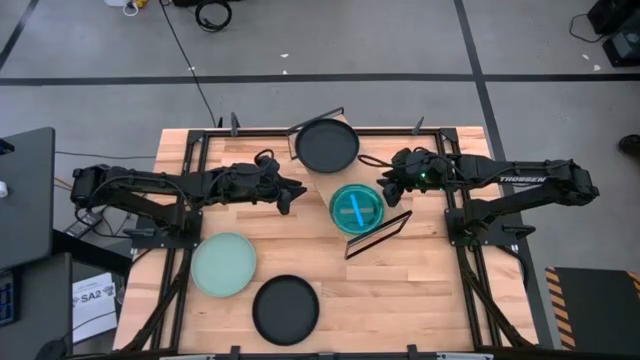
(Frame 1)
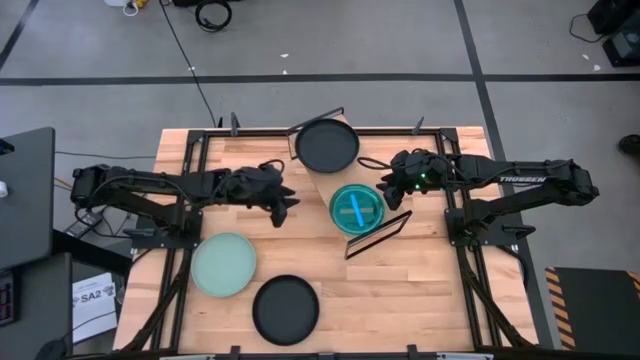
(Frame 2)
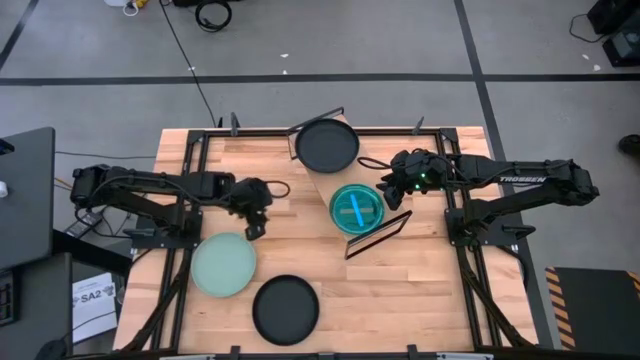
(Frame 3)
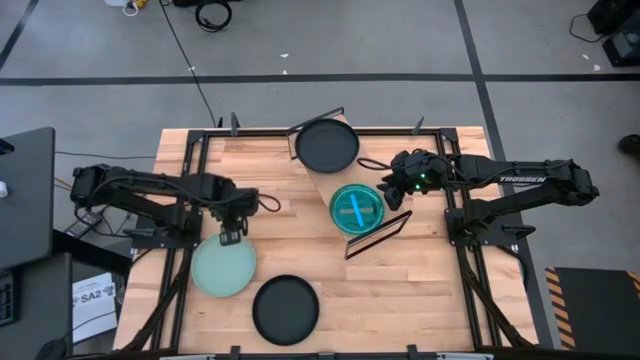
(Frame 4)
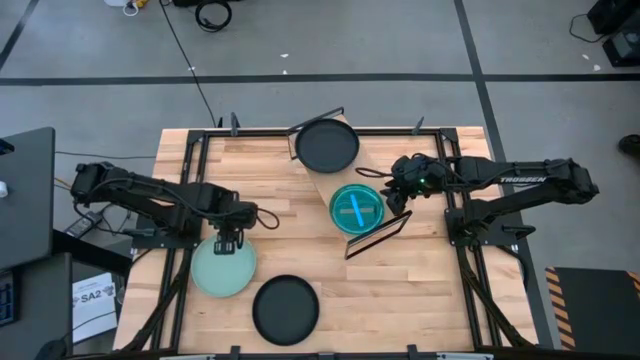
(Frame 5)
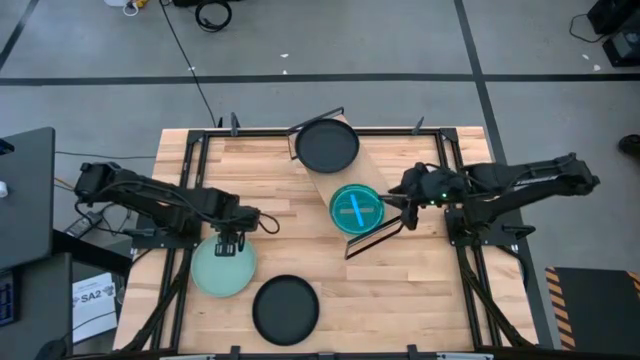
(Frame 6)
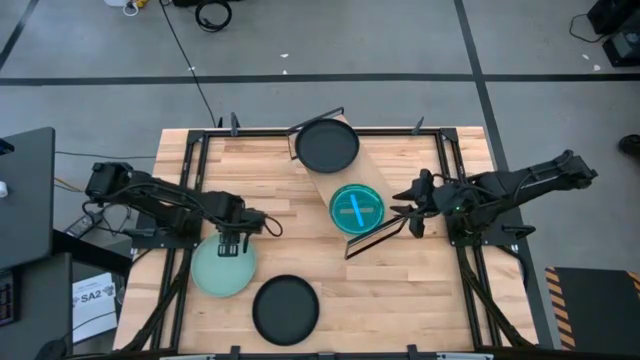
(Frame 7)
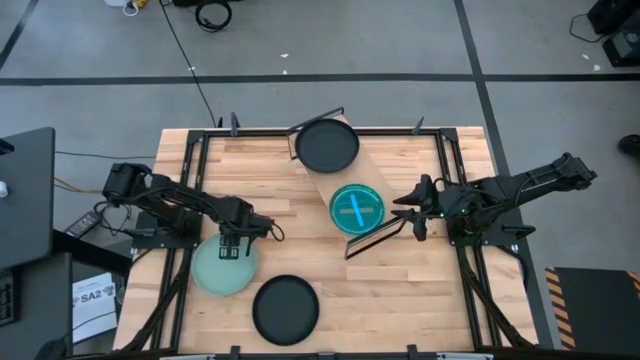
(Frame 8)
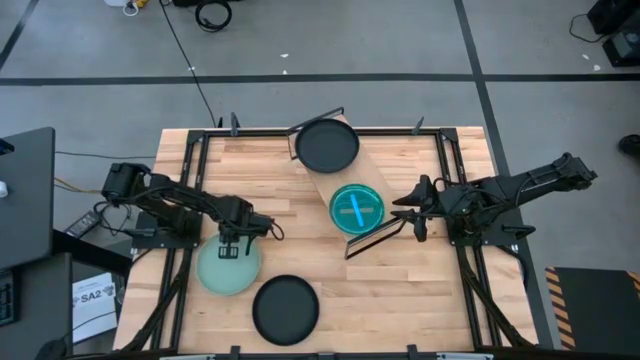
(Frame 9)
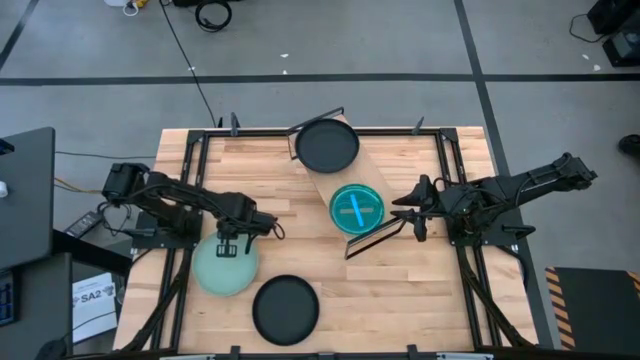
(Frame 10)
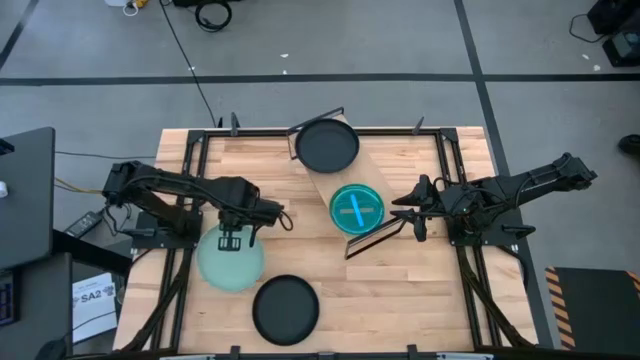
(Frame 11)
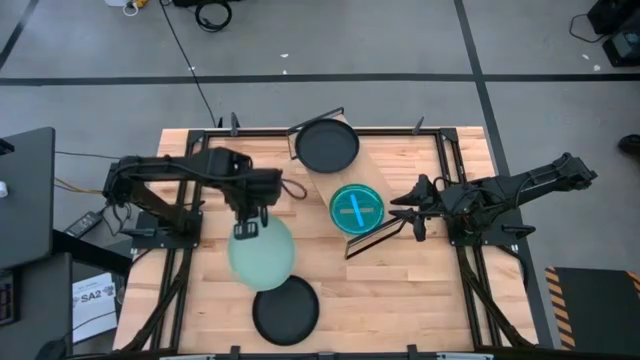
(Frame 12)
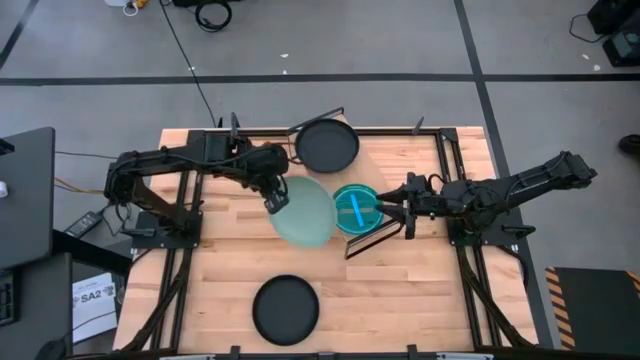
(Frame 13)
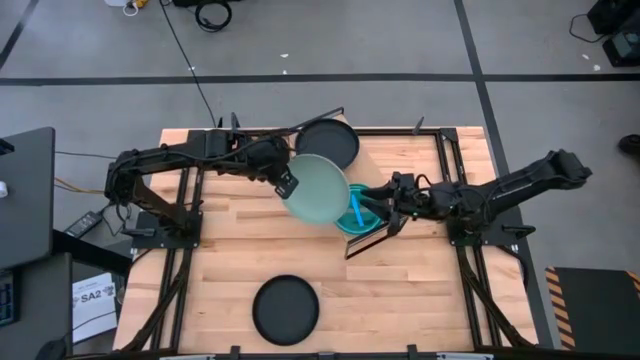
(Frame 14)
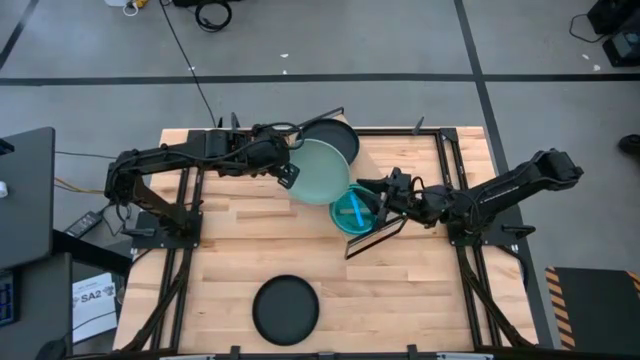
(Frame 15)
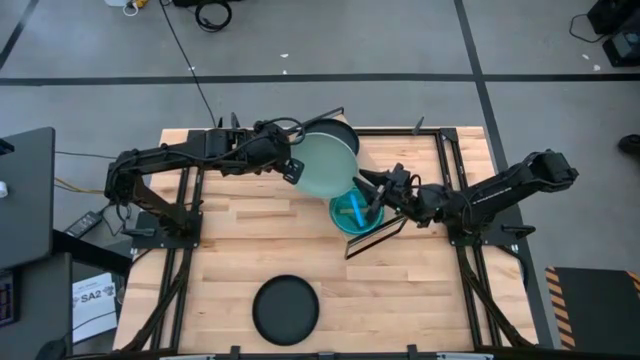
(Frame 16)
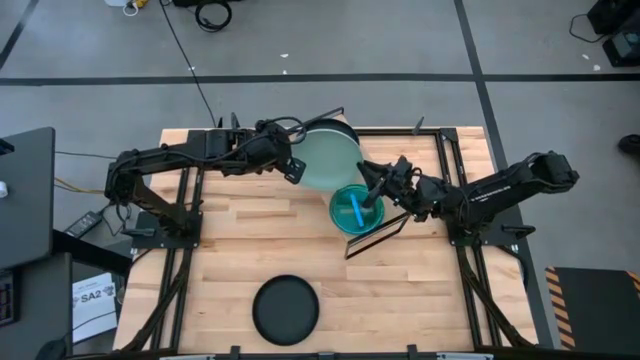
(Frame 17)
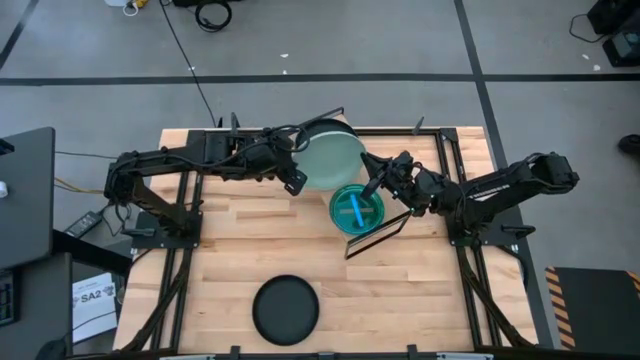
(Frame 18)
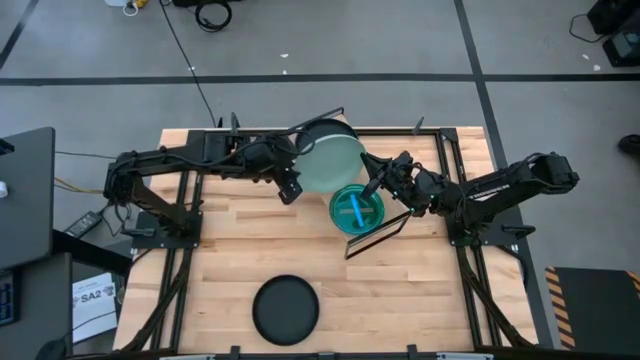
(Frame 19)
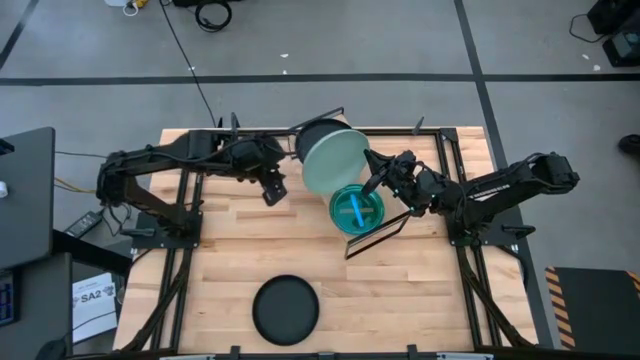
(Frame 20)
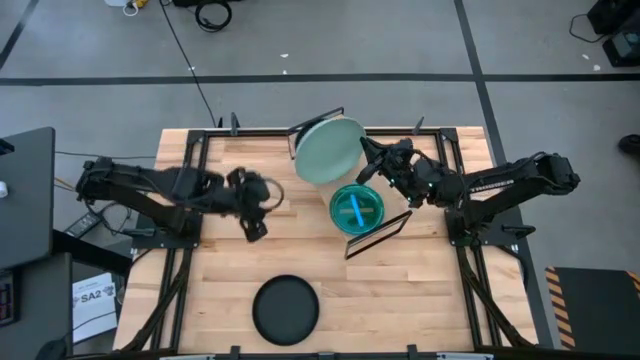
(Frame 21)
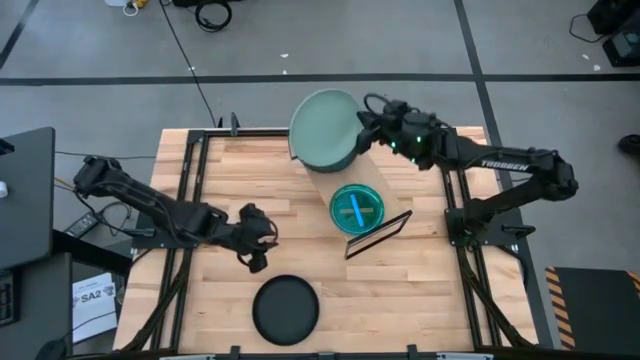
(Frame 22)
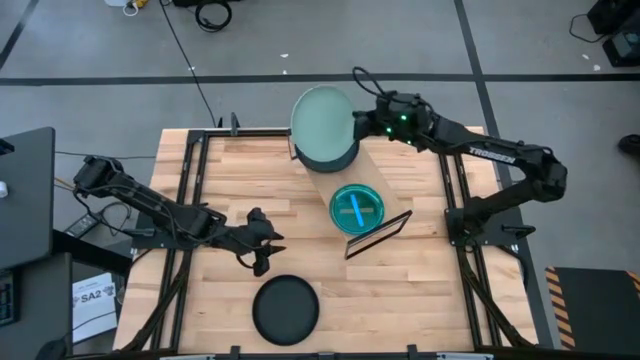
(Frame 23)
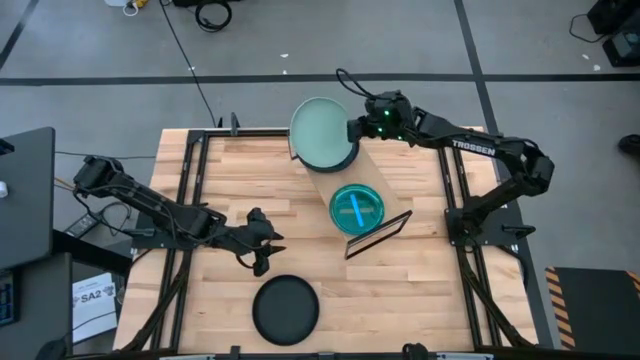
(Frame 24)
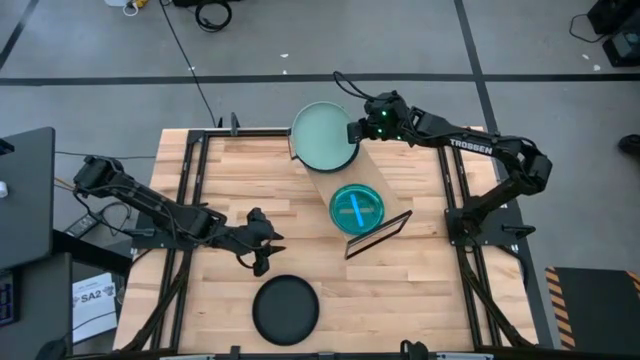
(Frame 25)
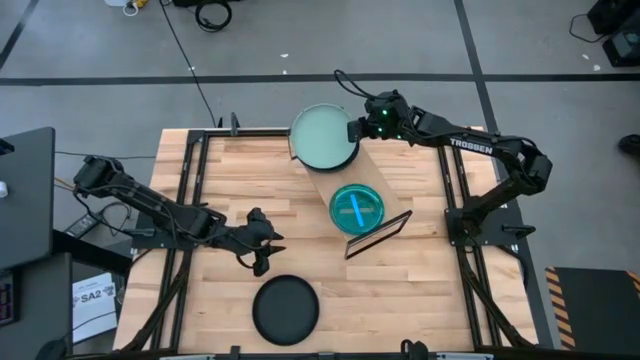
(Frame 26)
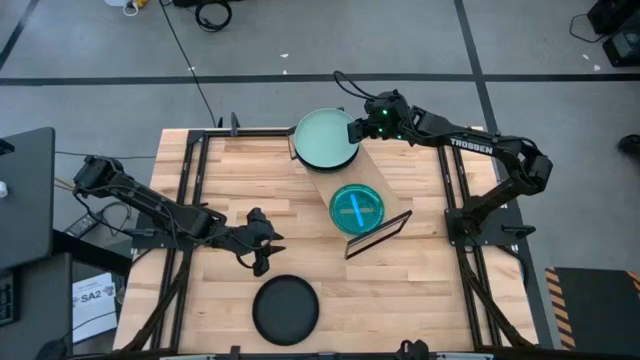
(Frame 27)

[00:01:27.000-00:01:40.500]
Task: Place and stack plates onto a shelf
Stack the light gray plate on the top of the black plate on the shelf

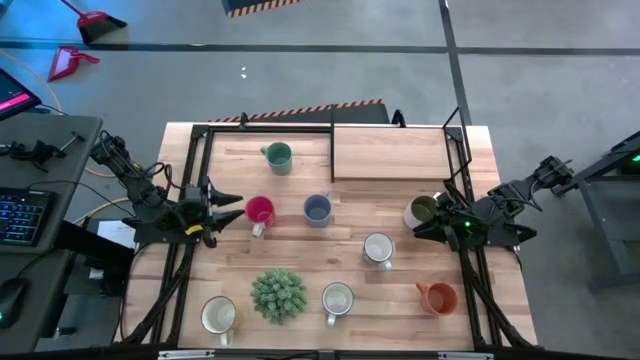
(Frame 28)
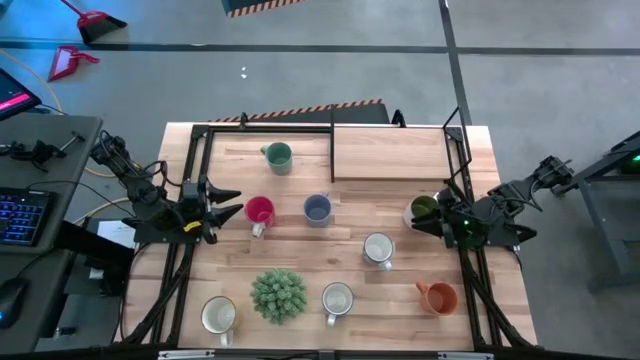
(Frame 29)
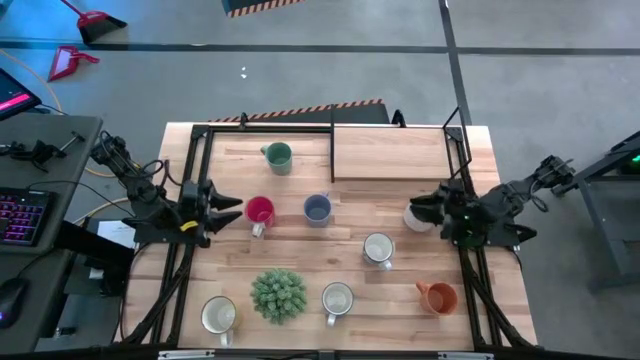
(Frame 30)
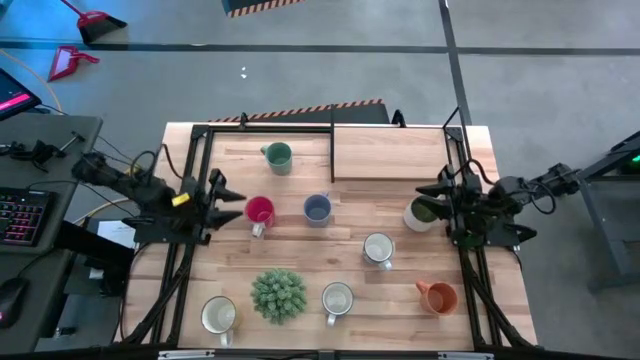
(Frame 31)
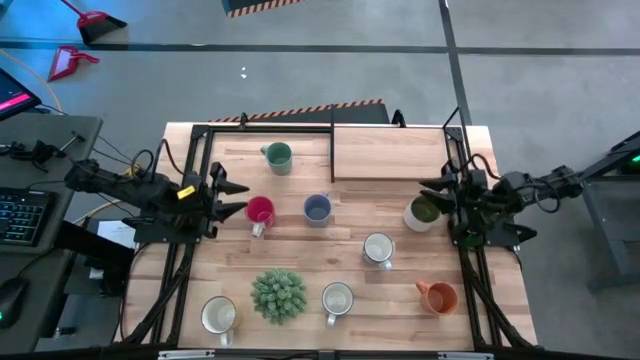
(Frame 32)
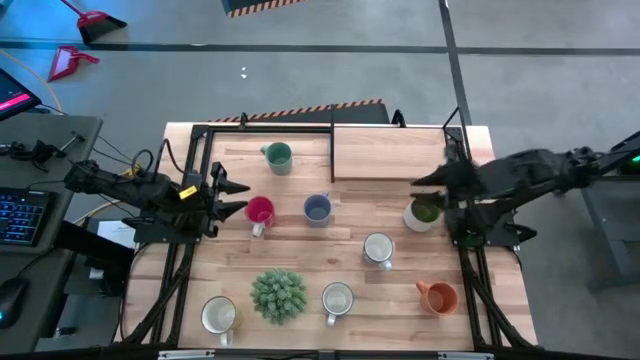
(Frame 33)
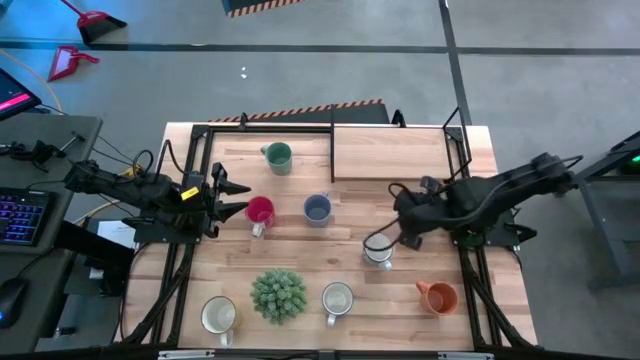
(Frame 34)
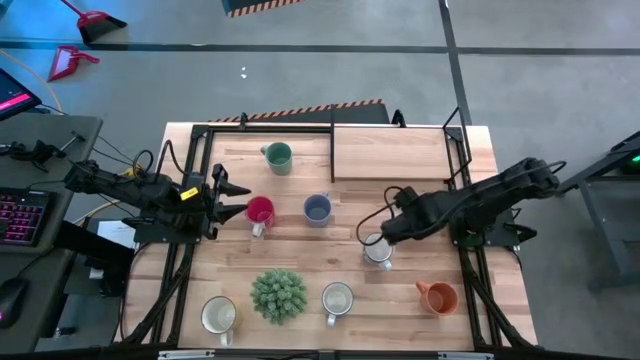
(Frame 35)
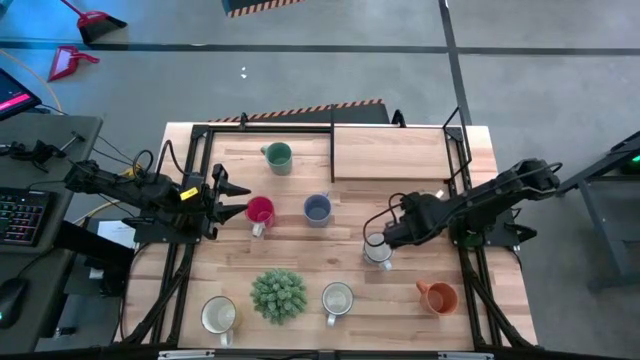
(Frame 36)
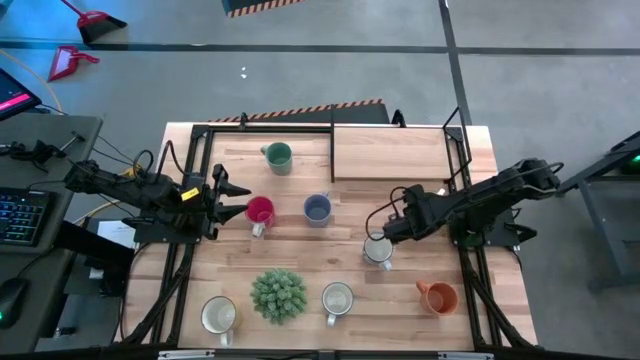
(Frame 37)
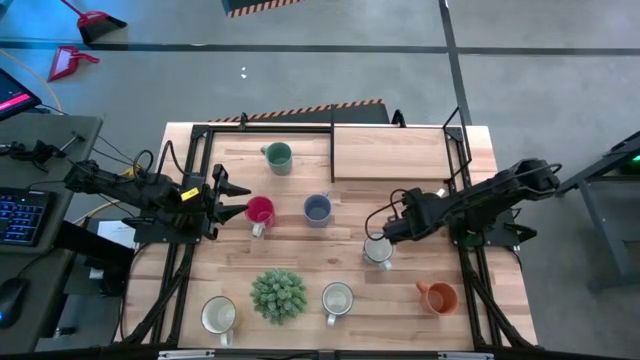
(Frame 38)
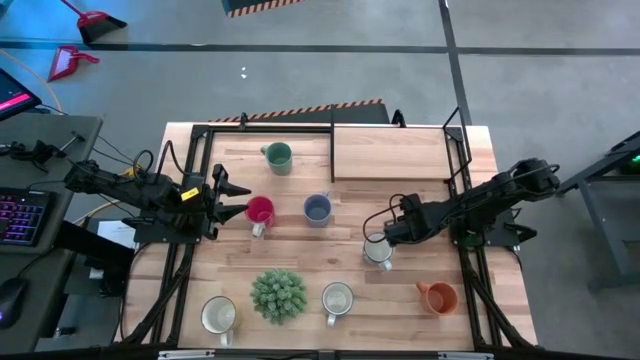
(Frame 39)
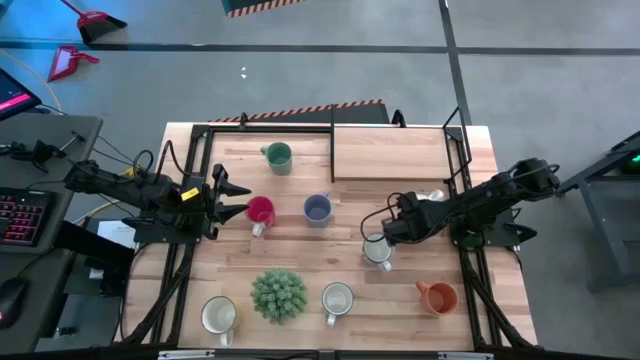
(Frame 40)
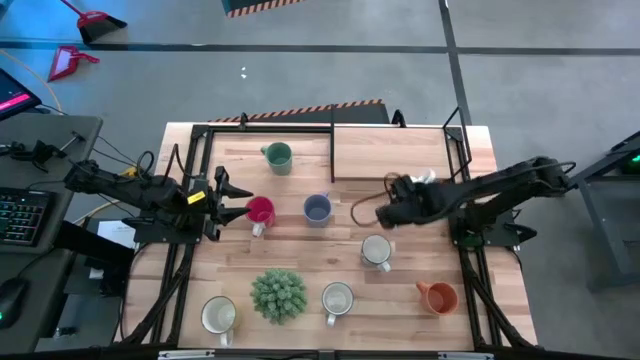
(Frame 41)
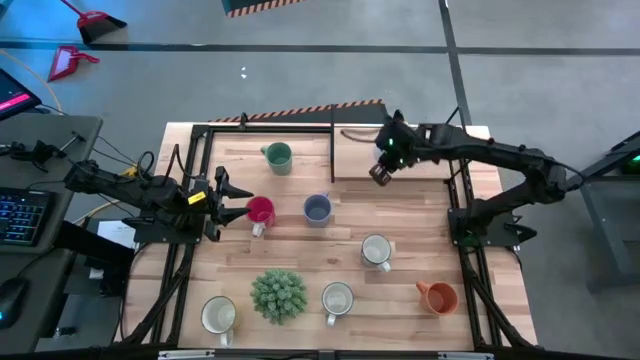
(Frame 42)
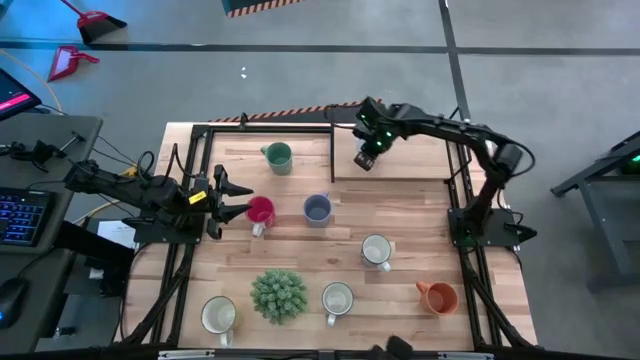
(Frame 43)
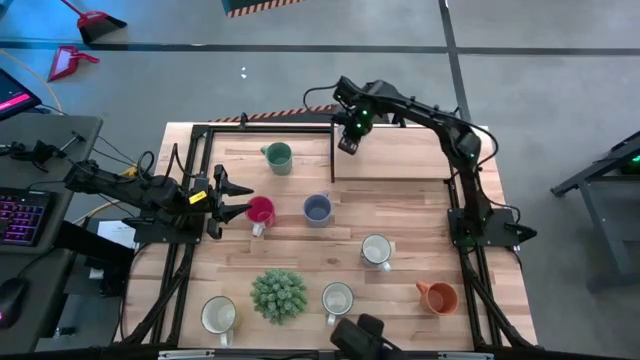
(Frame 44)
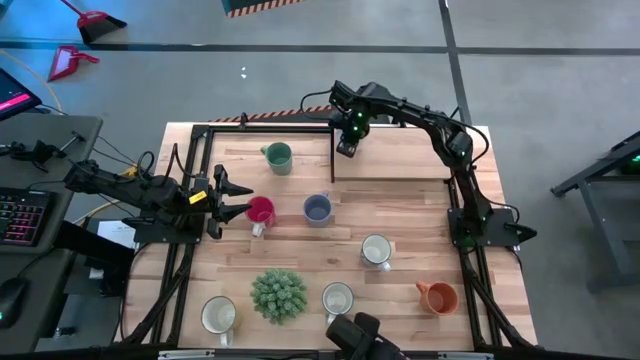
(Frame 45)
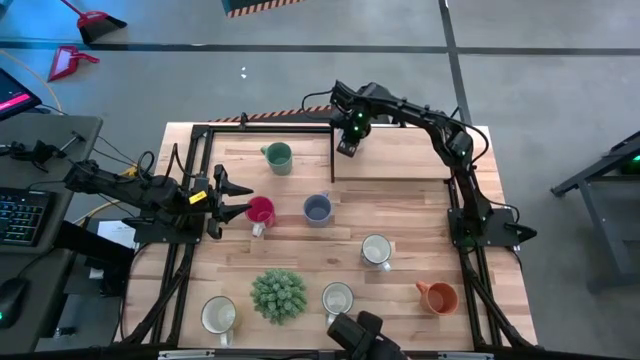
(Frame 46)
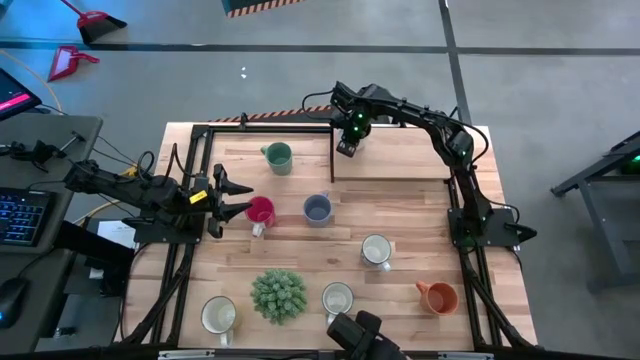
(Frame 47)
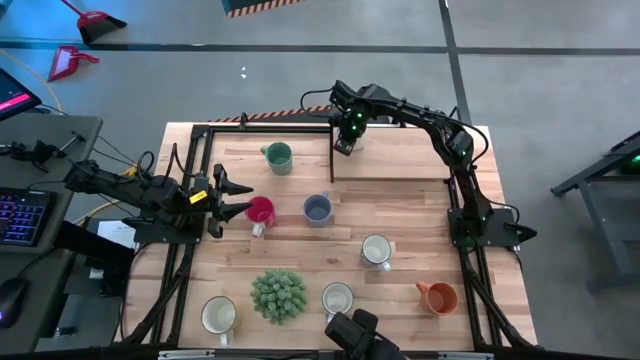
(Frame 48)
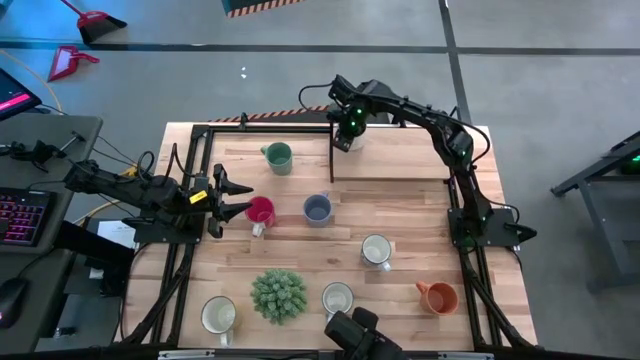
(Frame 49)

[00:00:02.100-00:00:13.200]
Task: Place coffee mugs
Put the green mug on the shelf
